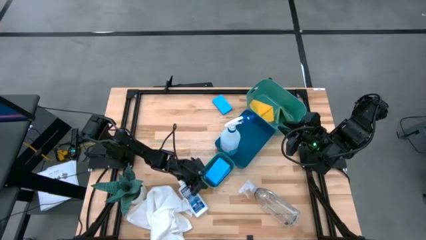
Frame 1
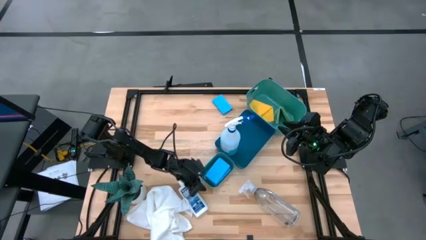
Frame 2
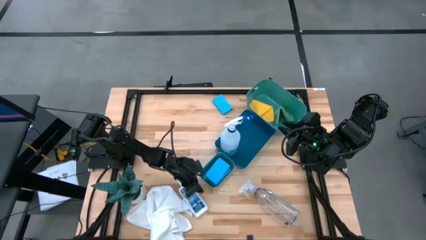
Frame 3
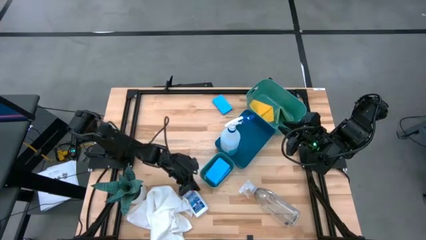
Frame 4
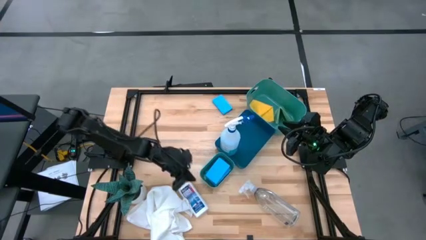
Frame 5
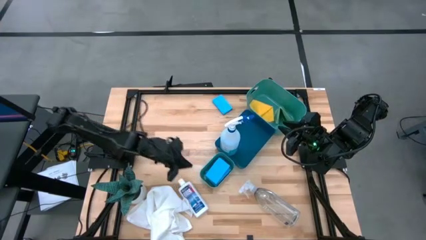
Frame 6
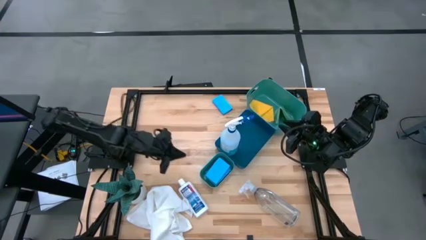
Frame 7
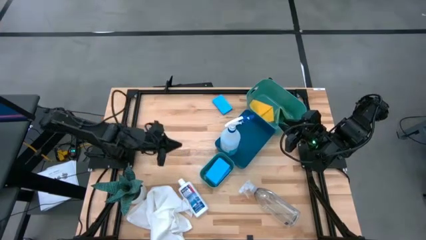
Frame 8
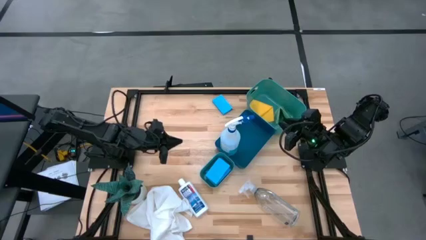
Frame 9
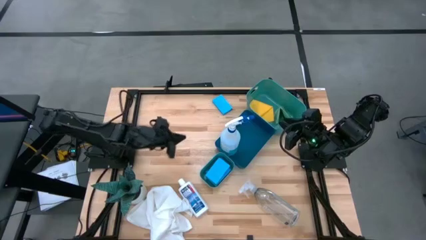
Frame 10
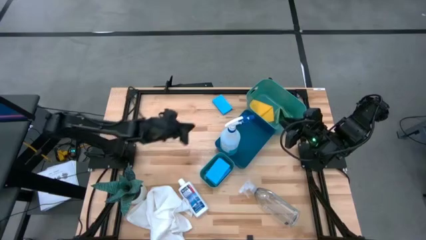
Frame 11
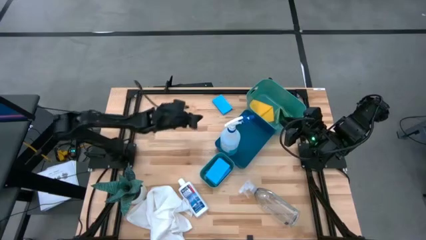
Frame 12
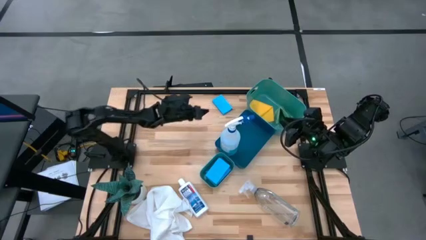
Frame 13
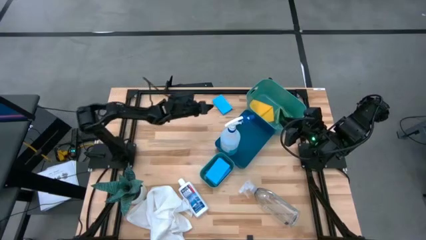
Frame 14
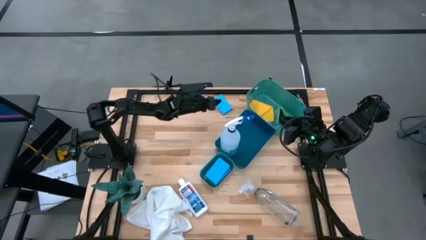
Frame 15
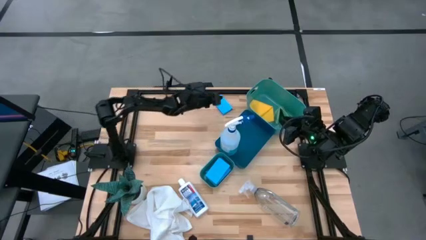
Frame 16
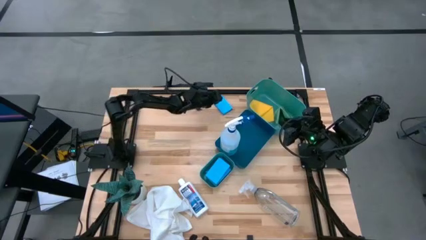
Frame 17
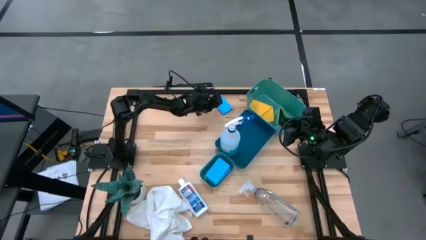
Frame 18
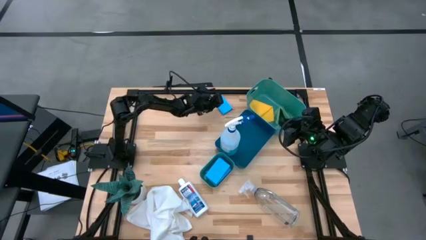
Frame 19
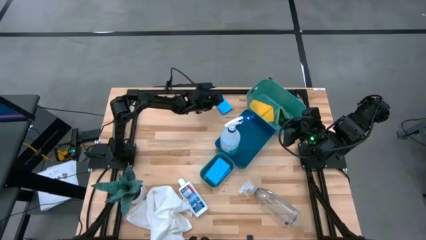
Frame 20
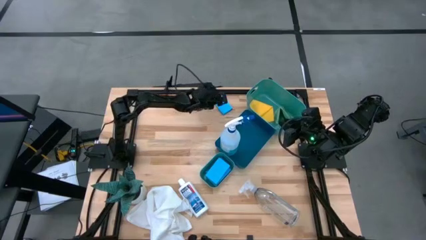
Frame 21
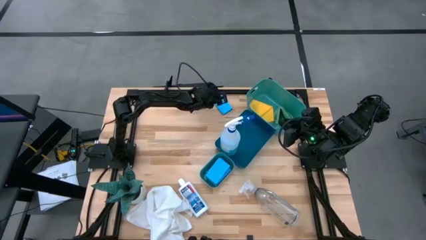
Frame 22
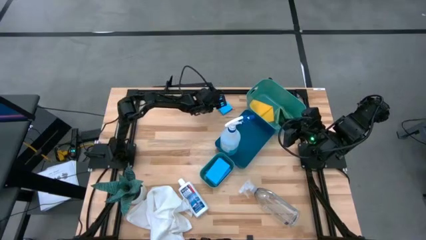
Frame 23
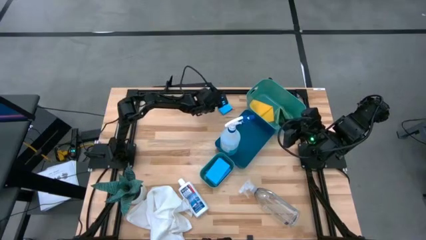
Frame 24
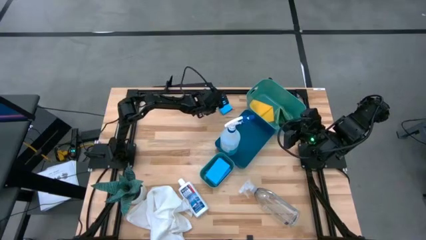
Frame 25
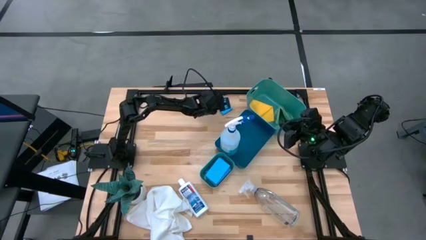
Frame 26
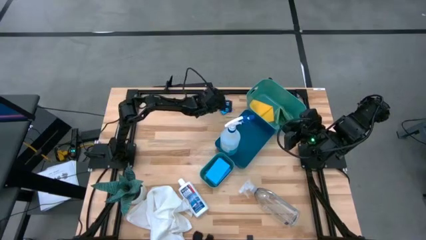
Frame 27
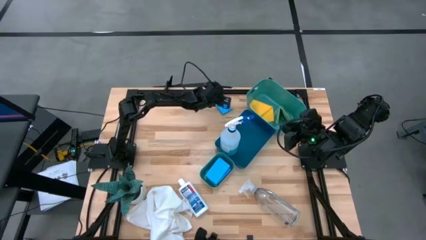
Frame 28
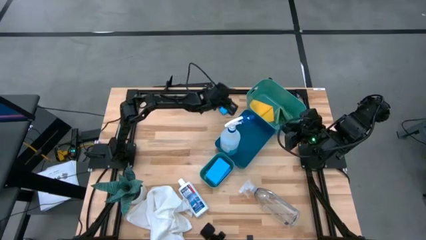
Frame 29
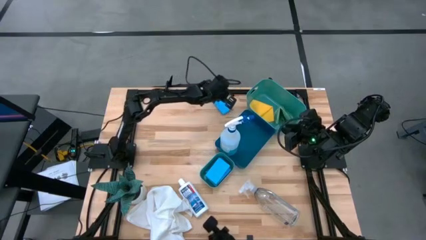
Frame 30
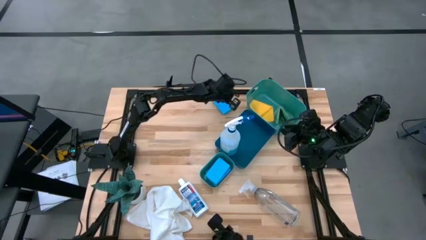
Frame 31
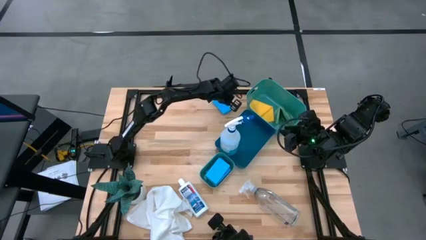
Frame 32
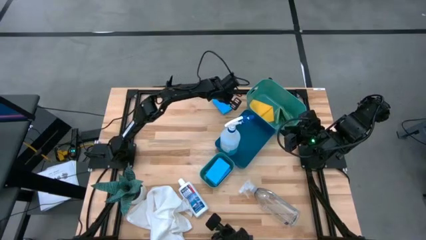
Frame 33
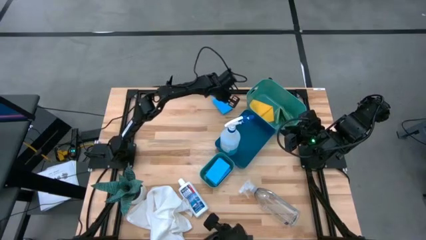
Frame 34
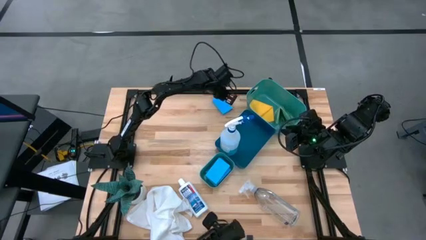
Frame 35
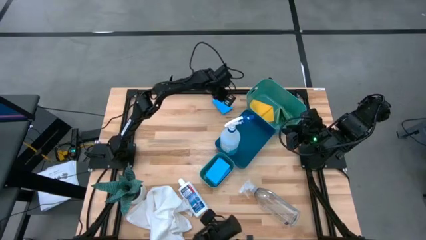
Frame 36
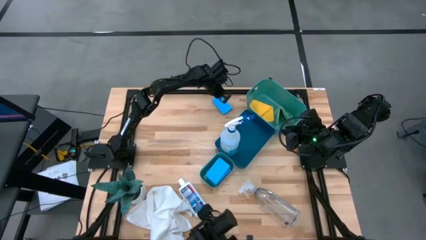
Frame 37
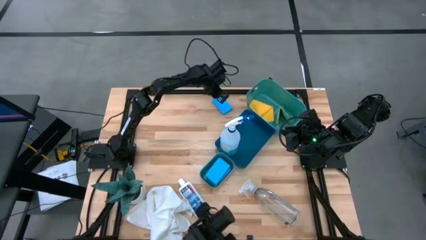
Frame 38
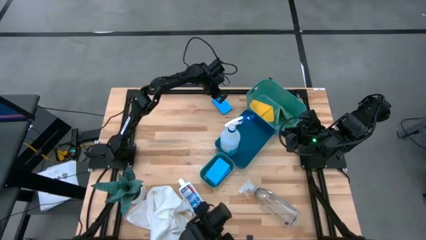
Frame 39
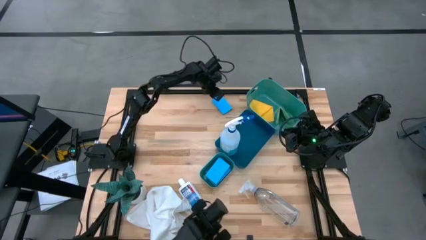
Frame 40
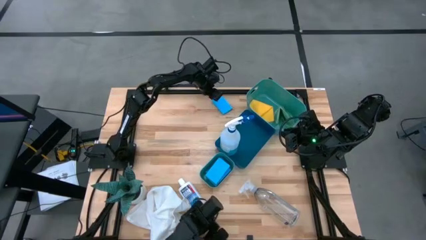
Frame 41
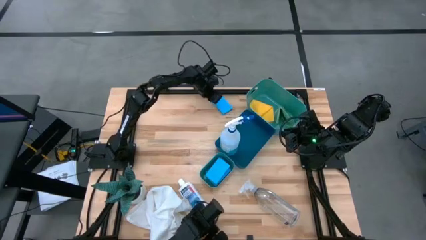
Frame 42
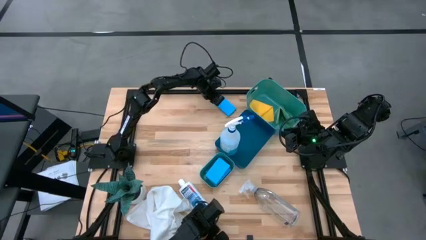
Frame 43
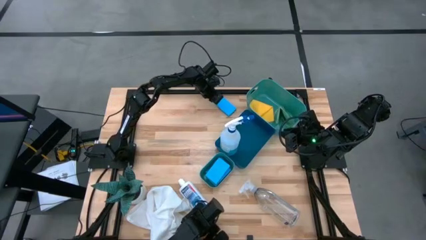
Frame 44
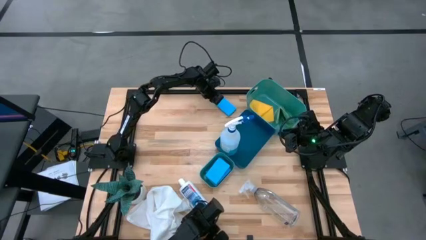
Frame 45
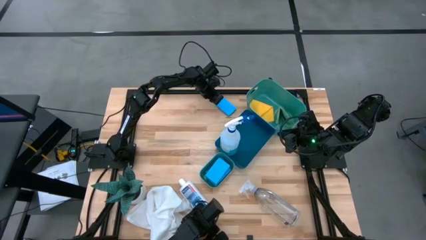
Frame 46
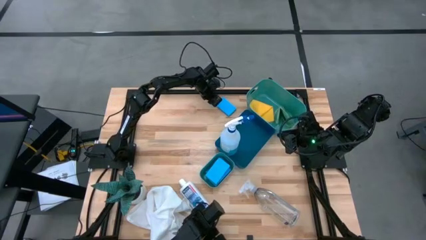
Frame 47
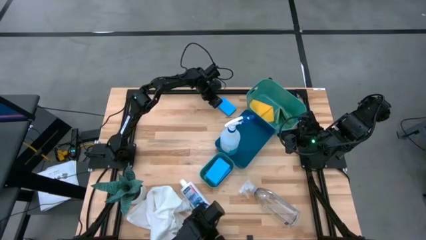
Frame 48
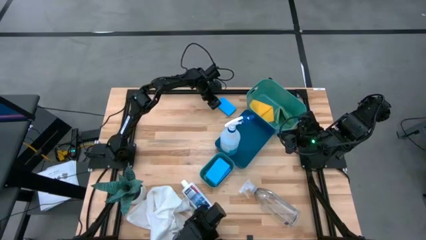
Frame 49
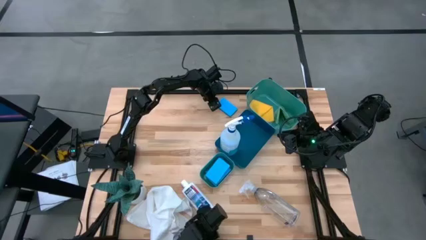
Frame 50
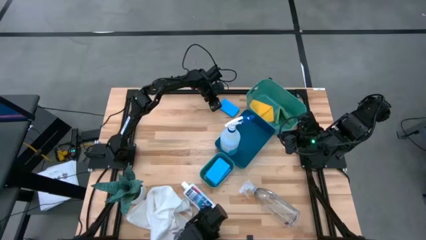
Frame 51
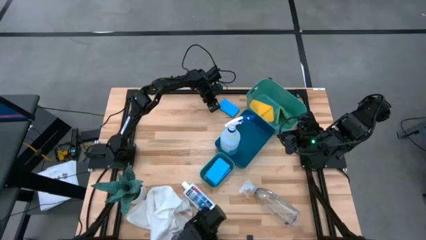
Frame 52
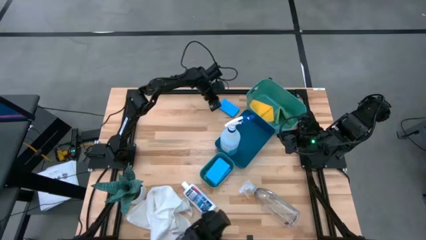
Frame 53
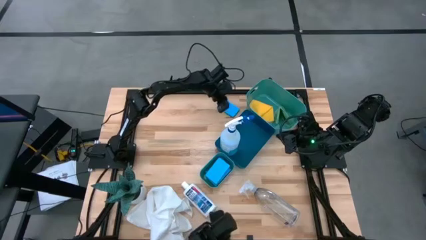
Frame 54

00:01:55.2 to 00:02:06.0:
Task: Pick & Place Kitchen Items
Put the light blue sponge into the bottom green bin

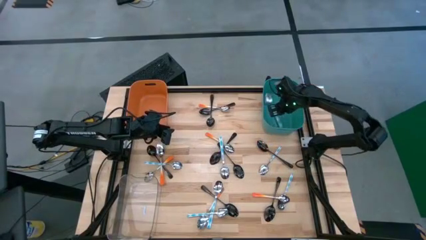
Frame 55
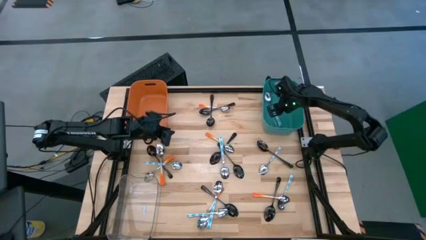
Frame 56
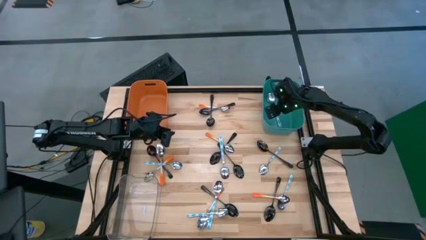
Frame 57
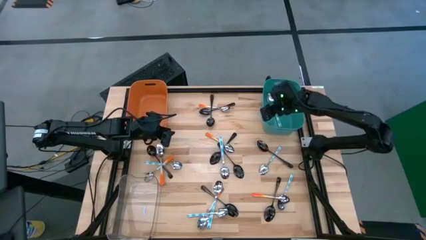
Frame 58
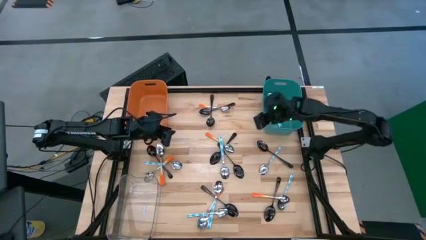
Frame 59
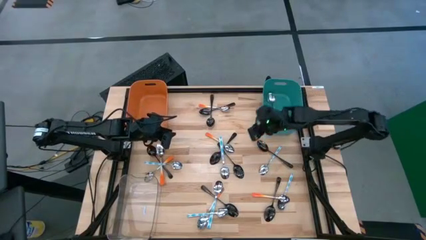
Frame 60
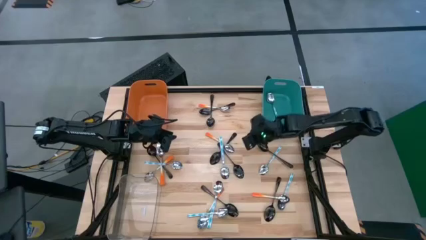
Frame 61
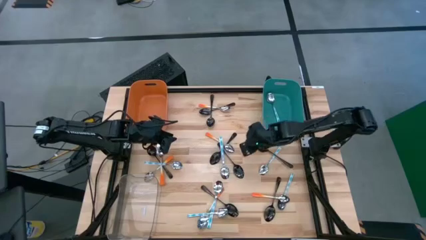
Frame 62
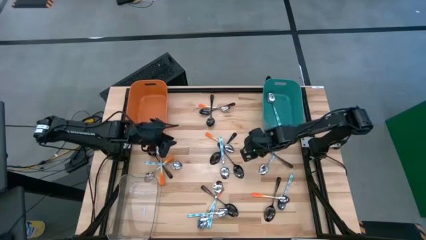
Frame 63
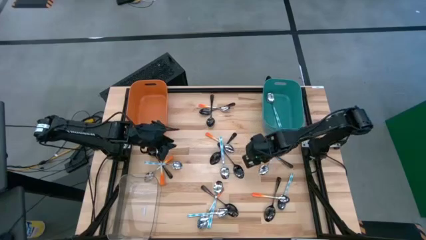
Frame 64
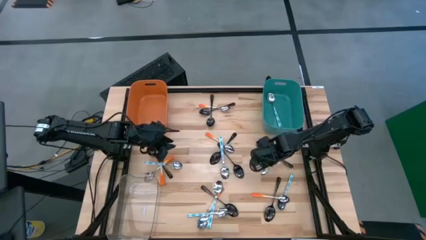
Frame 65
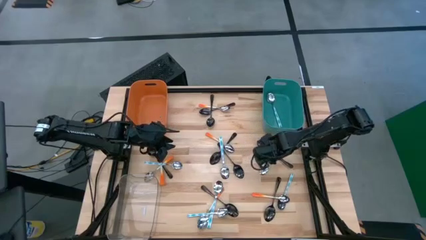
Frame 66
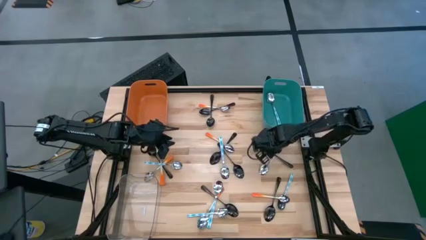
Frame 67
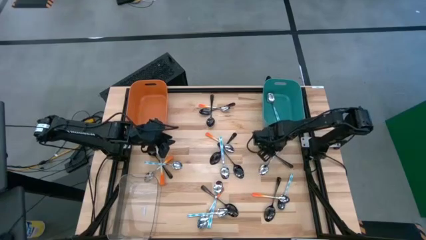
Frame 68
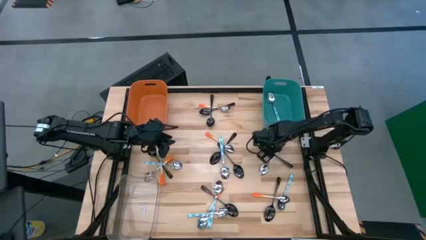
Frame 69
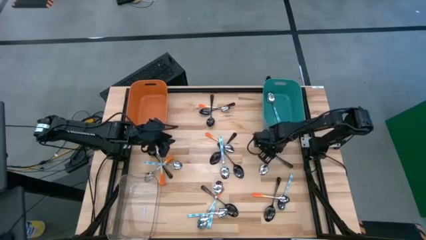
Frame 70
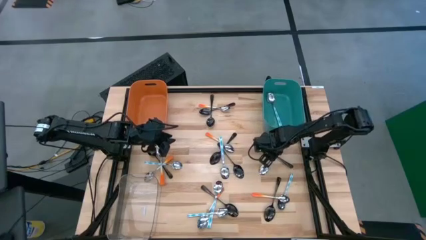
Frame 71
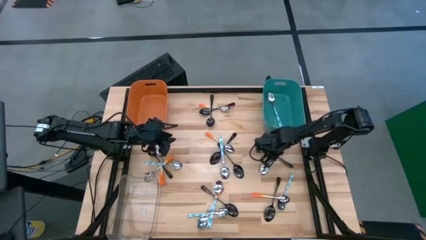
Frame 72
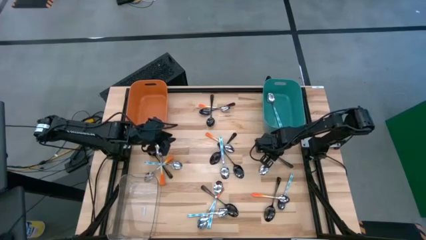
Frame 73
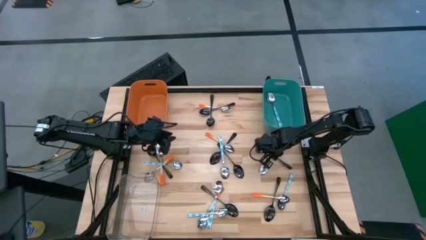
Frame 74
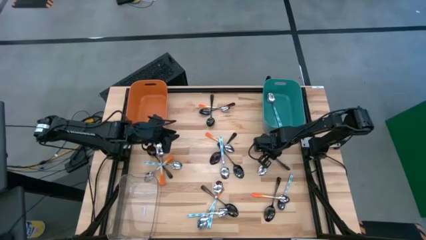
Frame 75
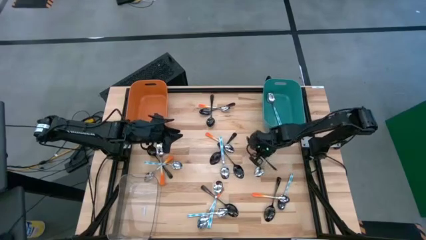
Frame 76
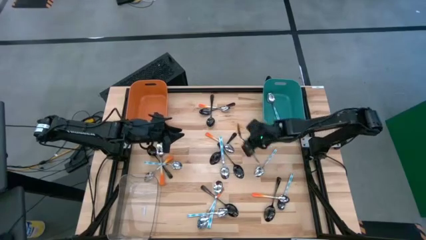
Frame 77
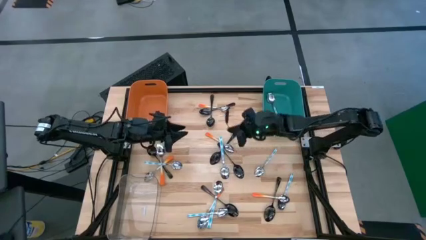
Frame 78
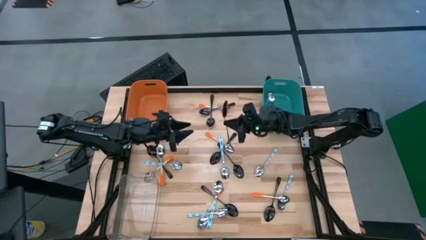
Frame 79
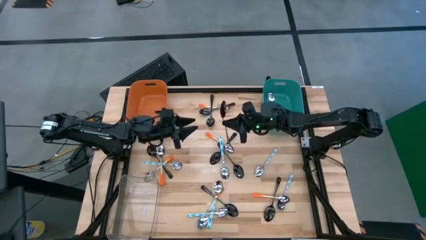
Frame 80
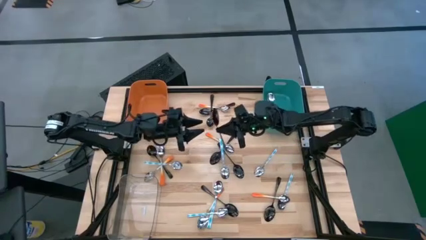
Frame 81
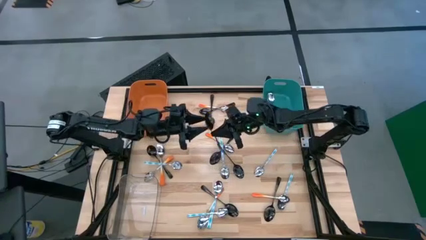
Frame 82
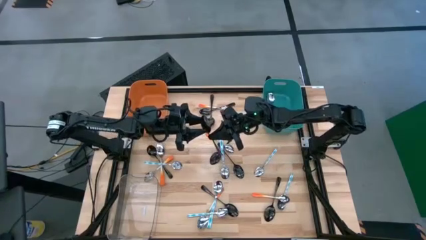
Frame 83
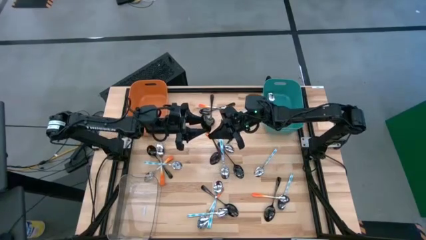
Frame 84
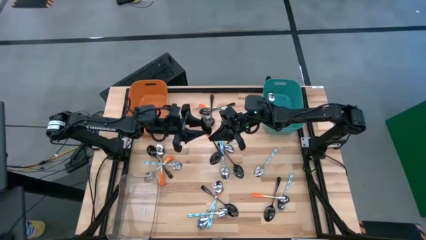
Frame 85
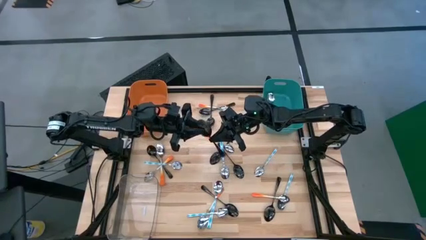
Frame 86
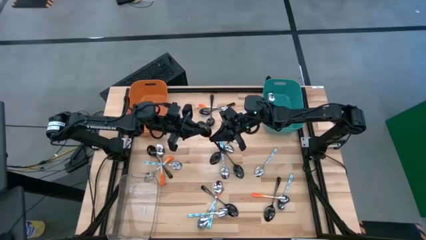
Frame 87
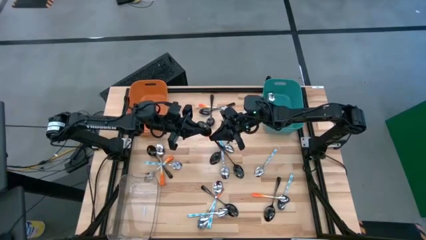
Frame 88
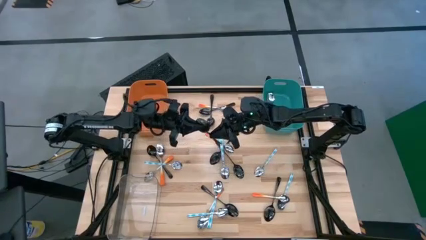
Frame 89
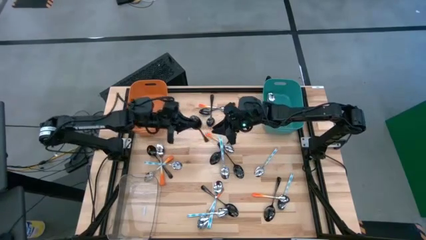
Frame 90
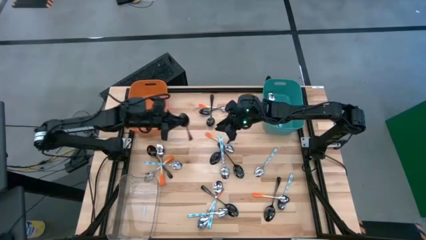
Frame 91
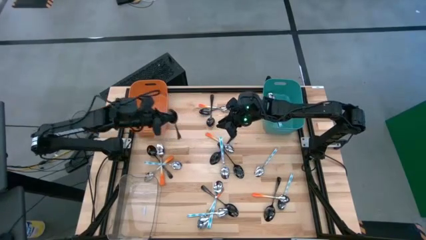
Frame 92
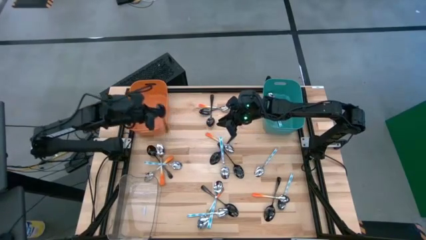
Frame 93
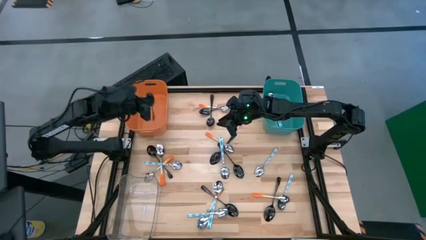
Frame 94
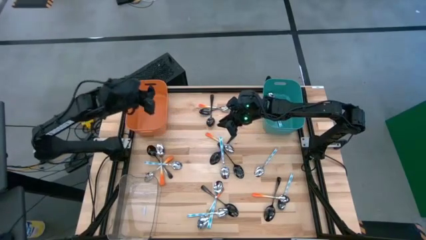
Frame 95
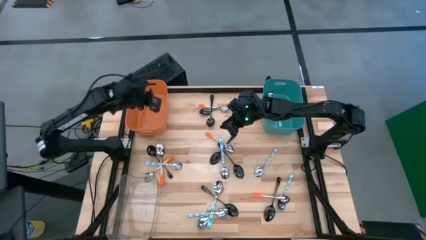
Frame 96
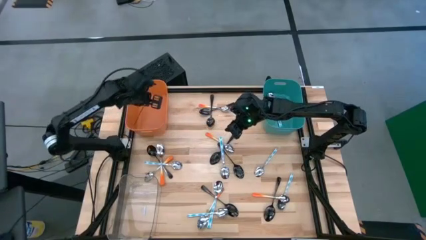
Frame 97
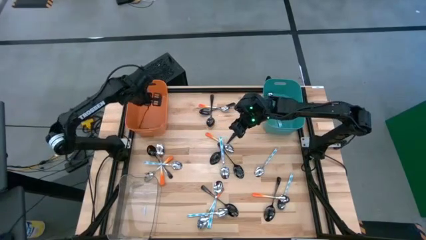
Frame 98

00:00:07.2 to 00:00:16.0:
Task: Sort silverware by color (type)
Put the black spoon into the orange bin
